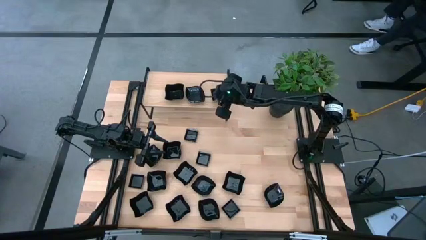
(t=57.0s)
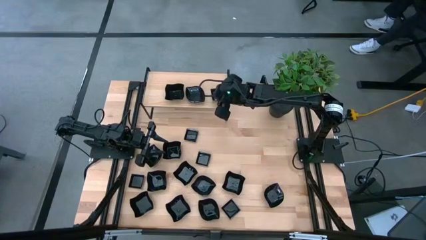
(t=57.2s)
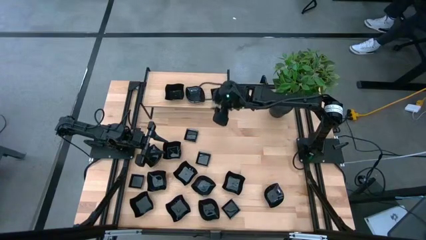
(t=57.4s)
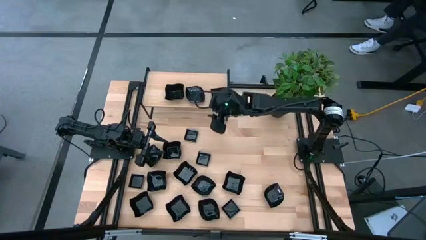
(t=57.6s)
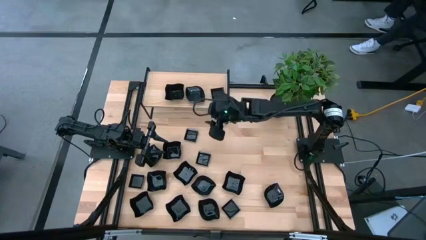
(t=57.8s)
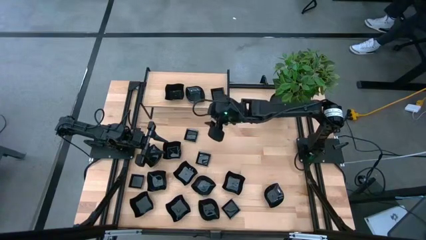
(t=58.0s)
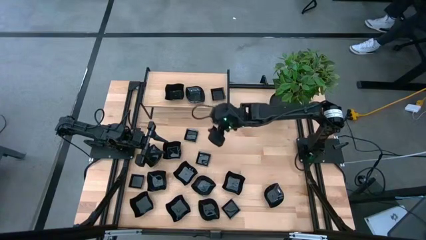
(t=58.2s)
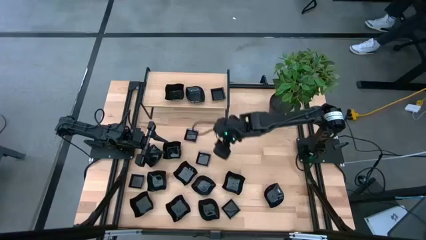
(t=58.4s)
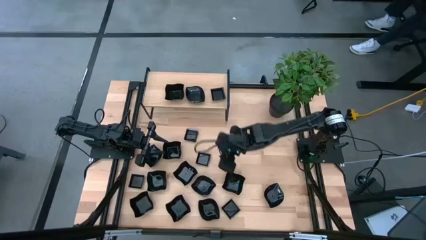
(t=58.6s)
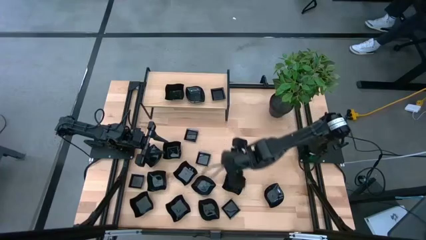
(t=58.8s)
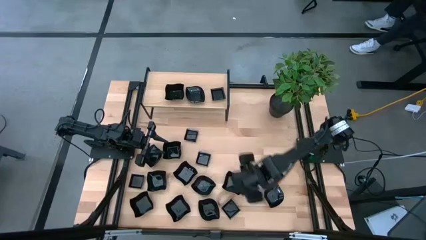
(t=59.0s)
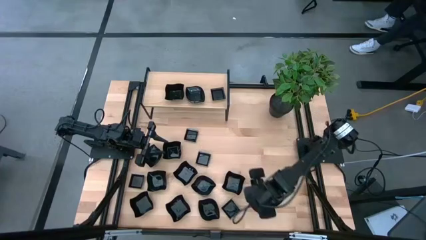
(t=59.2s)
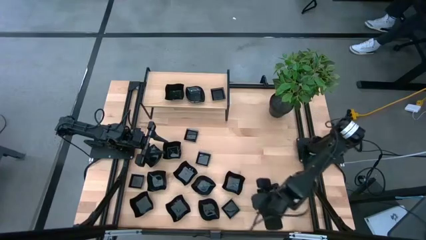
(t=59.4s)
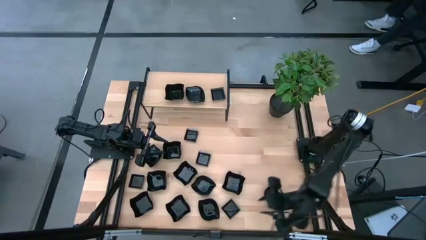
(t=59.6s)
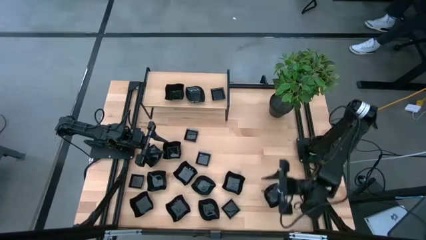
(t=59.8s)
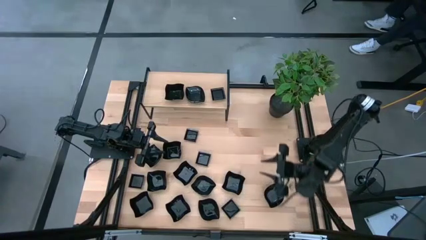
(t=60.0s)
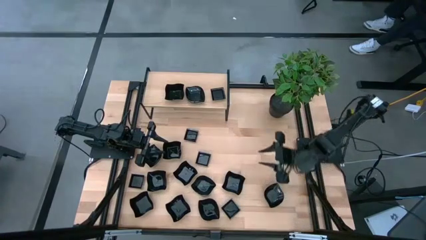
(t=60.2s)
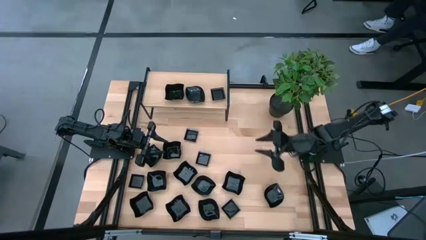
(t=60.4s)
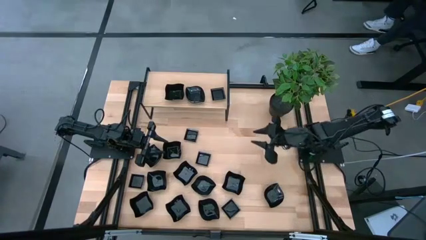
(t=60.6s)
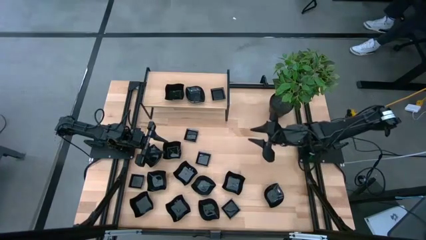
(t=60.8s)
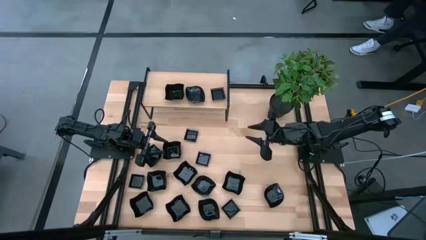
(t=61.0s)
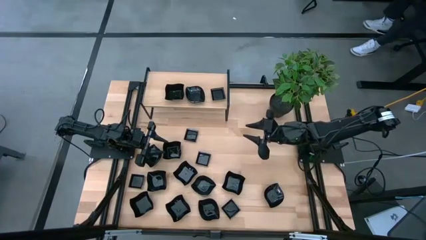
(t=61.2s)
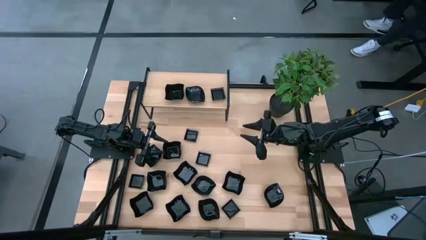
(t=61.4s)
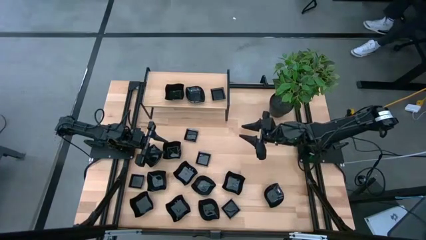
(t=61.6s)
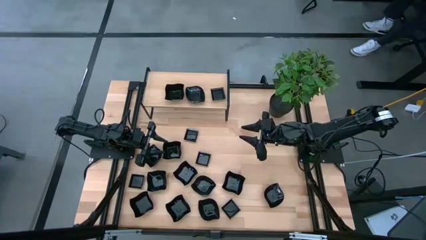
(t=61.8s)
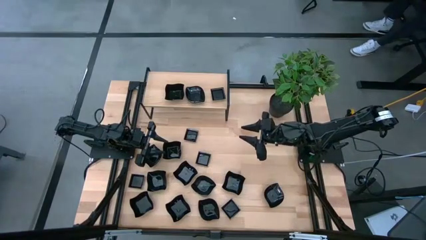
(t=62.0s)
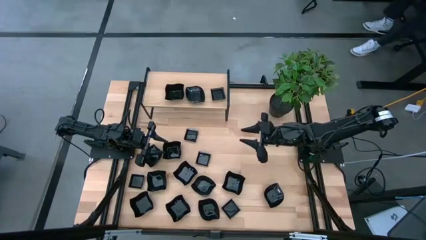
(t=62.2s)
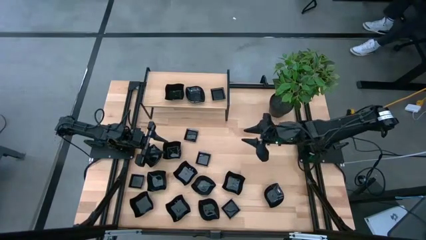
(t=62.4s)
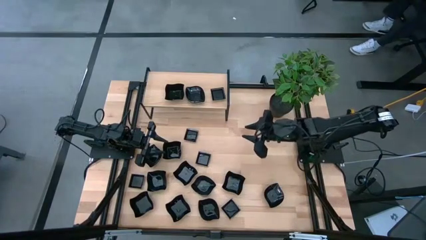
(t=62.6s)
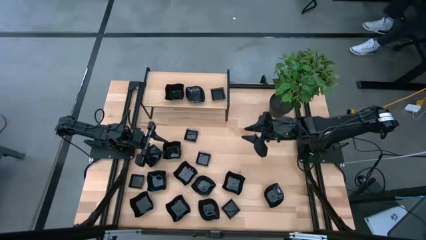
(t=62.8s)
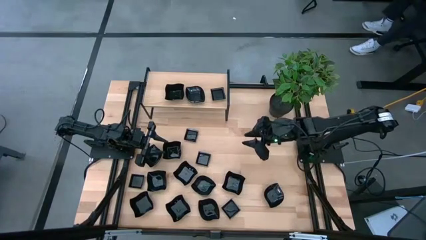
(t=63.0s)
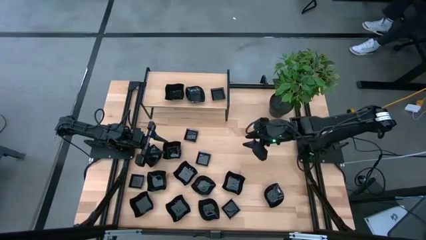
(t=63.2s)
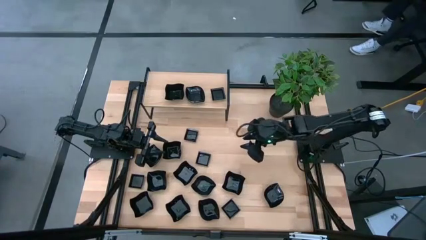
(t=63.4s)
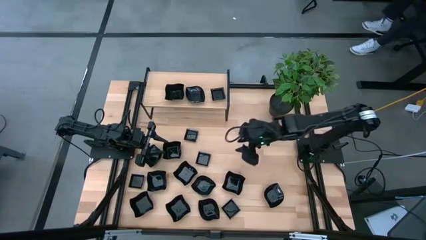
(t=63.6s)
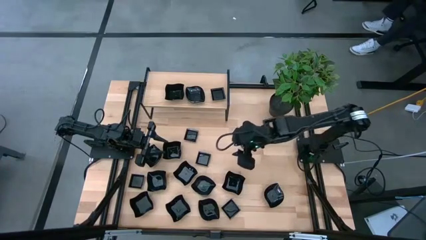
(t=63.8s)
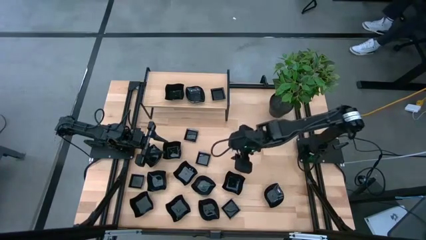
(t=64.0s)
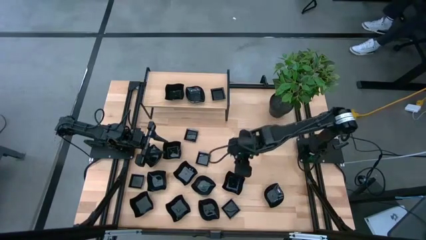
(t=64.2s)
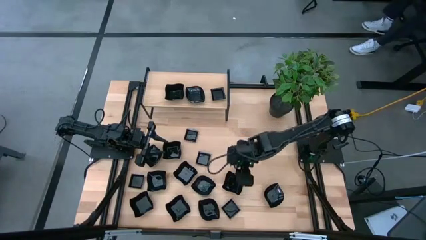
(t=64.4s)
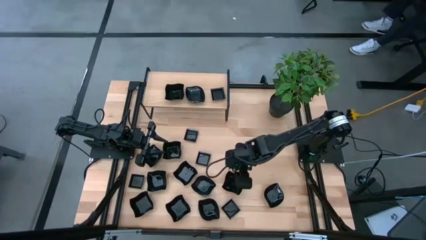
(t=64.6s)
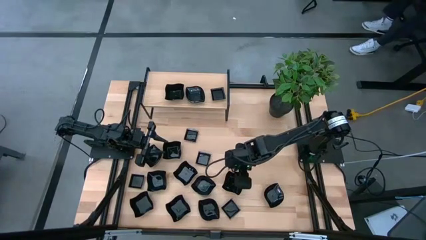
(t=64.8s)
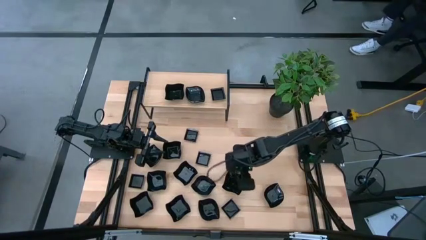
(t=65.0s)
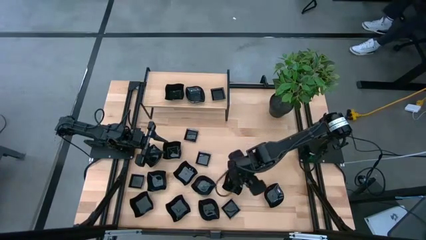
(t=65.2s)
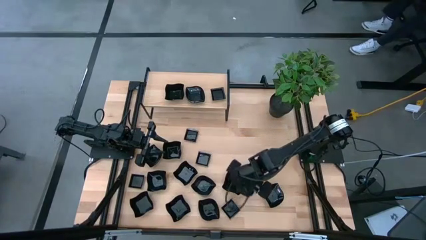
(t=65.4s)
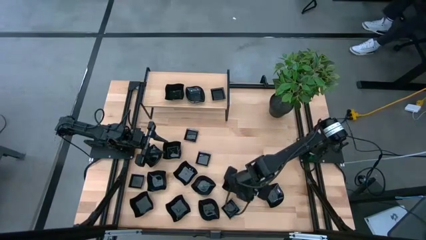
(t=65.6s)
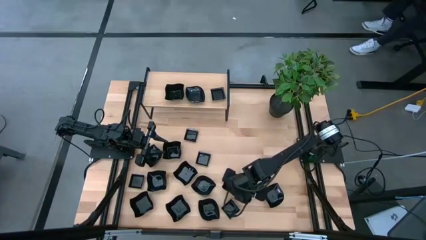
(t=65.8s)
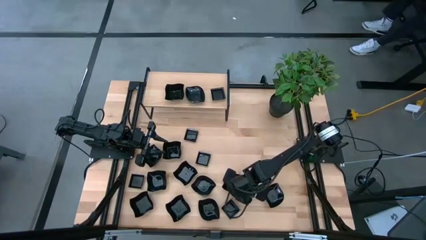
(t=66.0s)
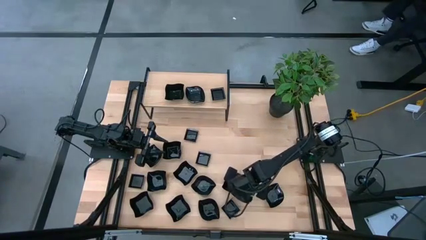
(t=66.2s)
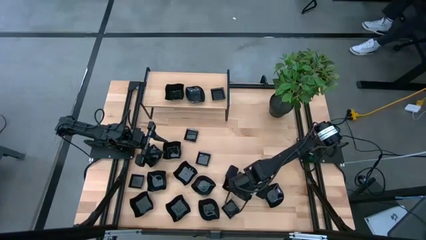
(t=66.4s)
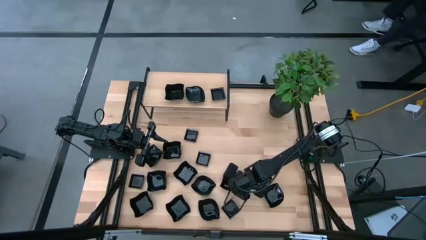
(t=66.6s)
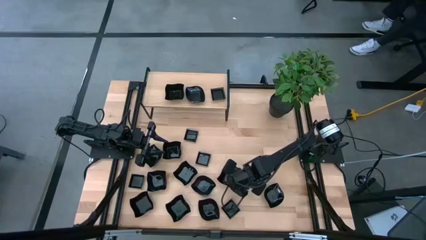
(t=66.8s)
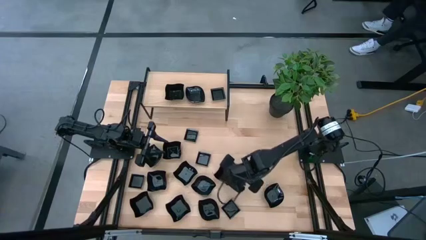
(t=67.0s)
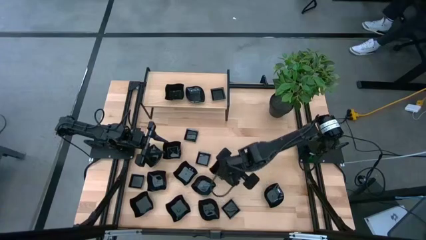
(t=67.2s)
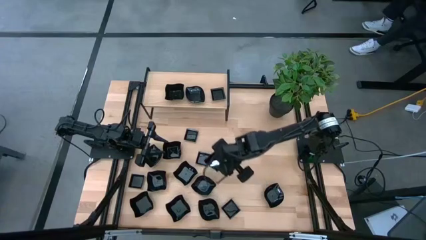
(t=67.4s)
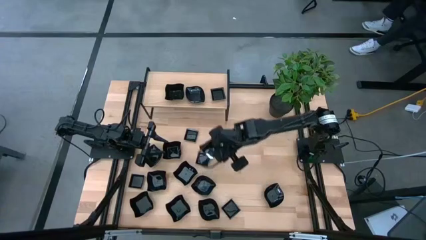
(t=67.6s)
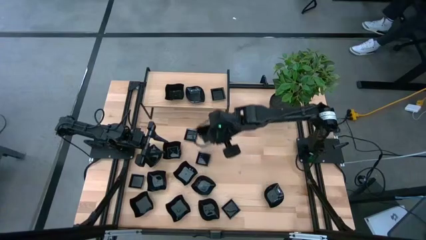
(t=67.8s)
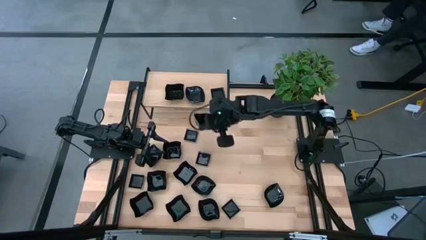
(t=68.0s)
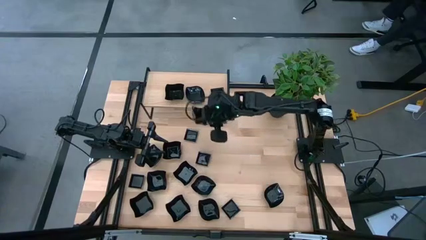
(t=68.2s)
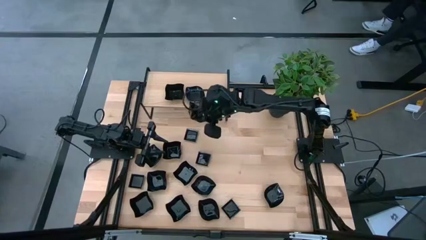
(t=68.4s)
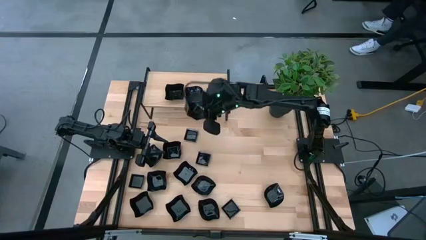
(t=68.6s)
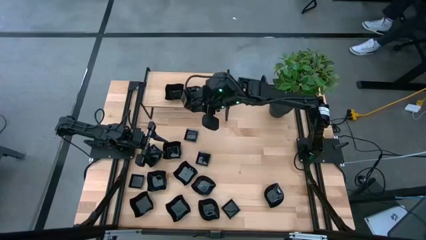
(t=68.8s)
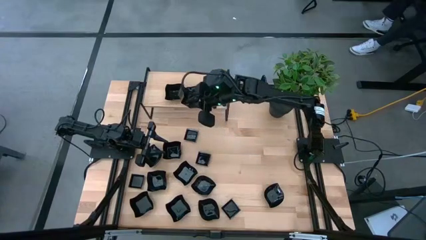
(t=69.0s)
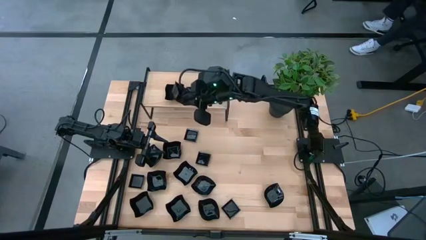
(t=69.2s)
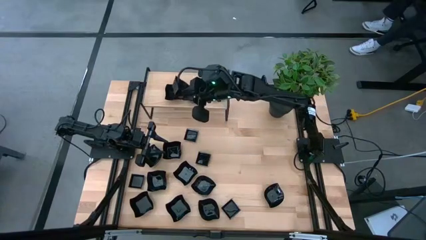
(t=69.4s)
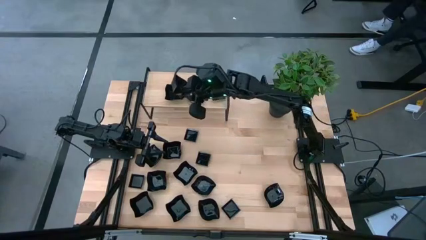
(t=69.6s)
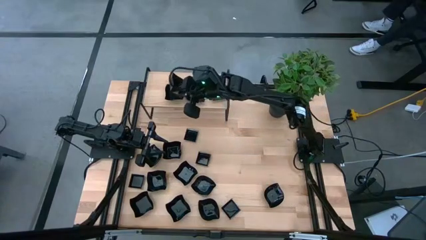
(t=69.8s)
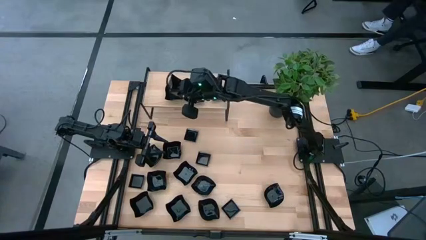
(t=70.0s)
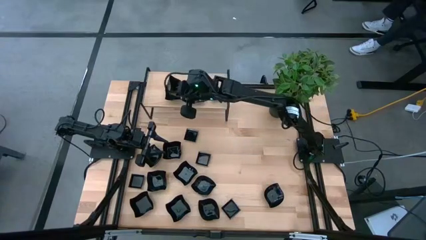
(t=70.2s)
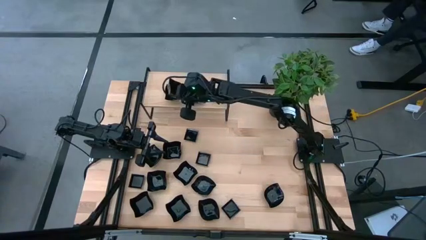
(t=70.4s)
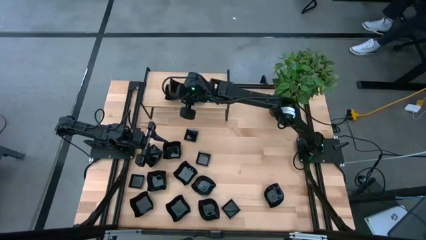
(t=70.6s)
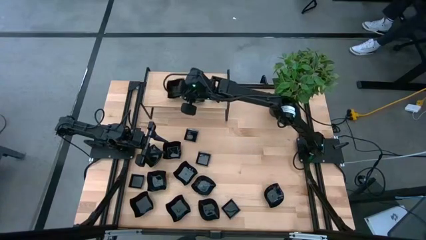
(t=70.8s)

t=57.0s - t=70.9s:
Task: Pick & Place Mini shaped plates
Stack the distorted square plate on top of the distorted square plate on the shelf

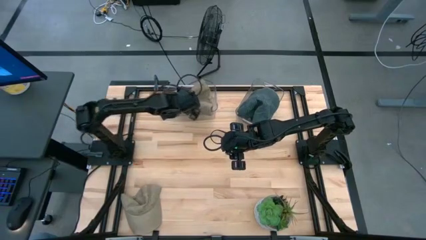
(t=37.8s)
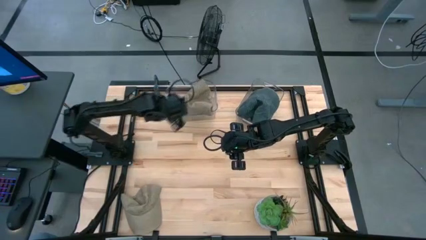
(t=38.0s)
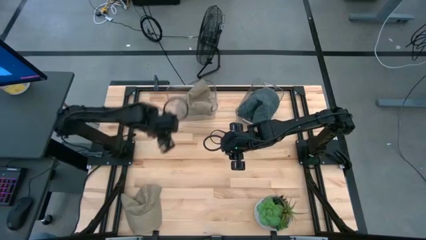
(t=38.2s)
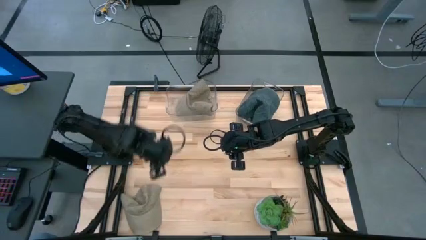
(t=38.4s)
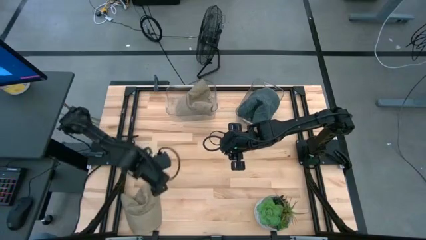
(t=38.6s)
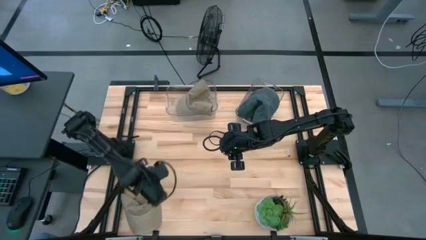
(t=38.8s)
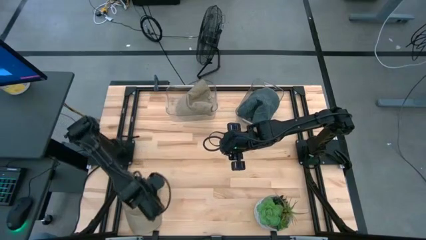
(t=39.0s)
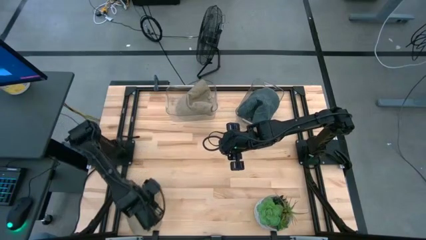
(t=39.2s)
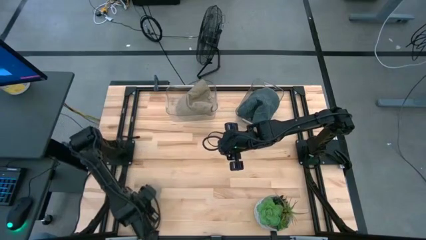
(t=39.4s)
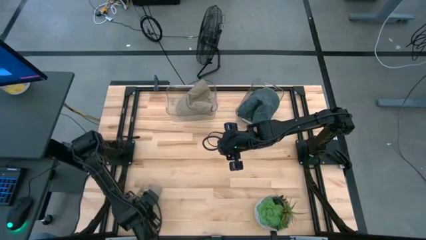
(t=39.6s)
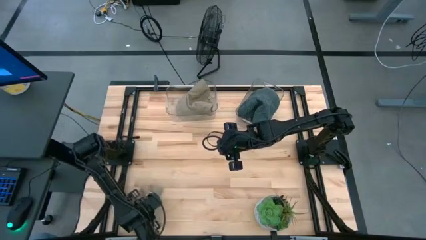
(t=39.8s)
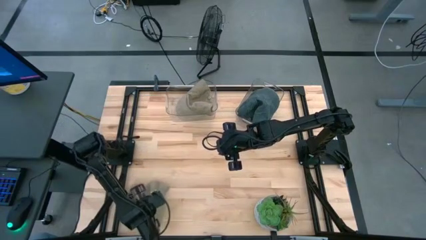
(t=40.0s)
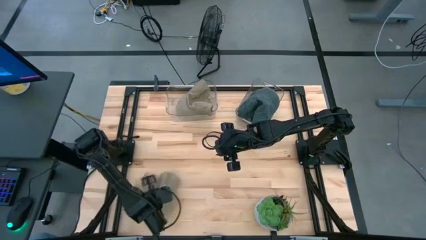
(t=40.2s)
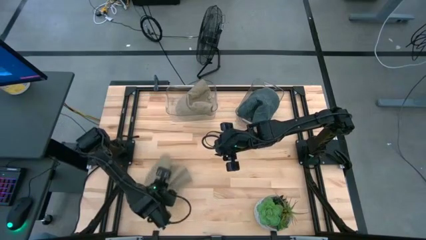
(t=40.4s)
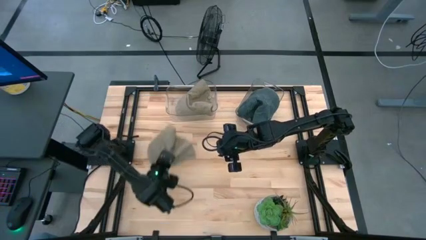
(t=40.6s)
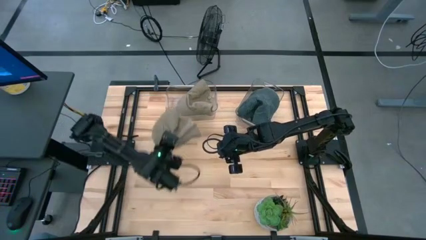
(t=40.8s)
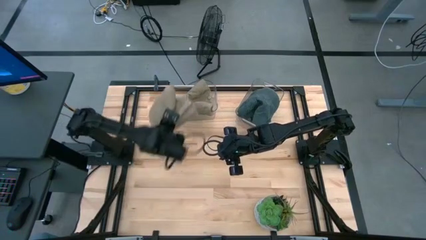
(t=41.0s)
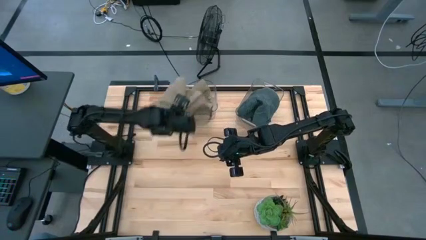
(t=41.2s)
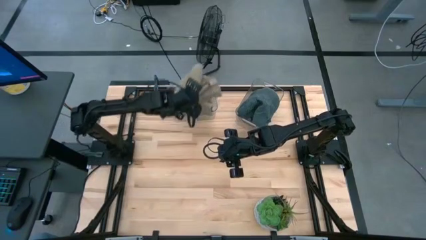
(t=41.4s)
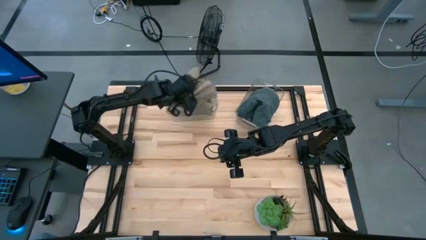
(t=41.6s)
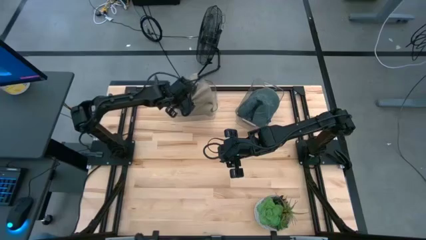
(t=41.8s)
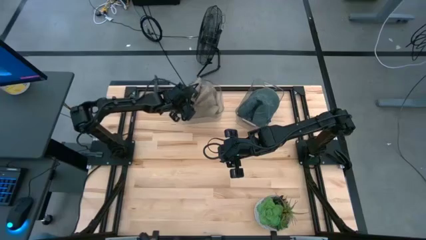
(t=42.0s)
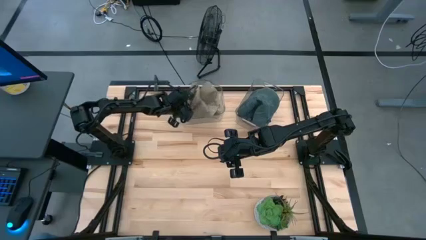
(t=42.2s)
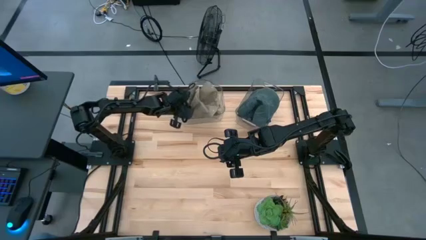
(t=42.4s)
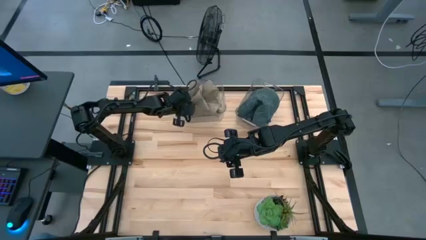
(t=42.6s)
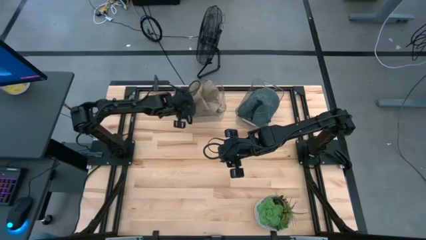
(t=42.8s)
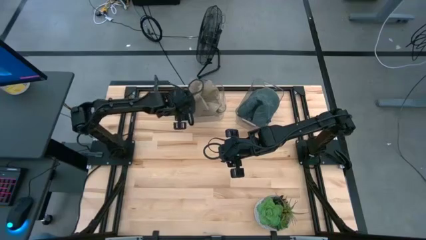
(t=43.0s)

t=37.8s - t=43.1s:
Task: Pick & Place hat
Put the brown cap into the left transparent bin
